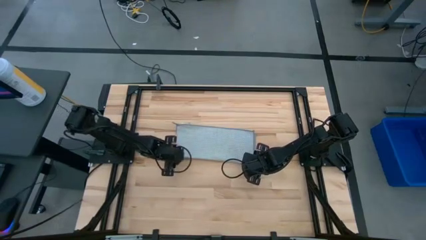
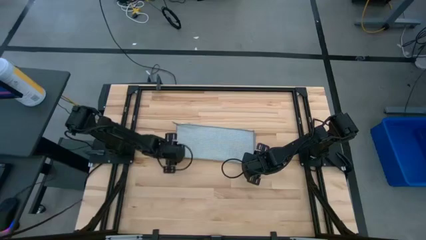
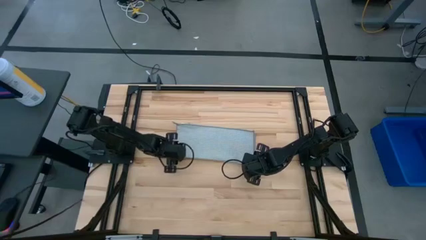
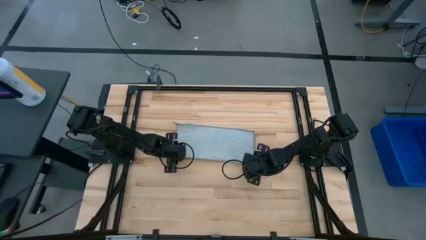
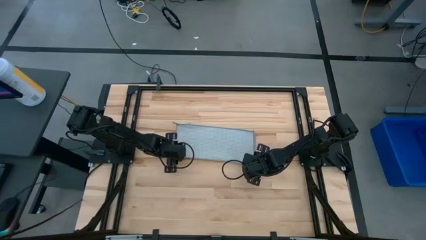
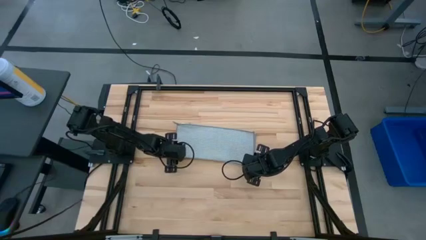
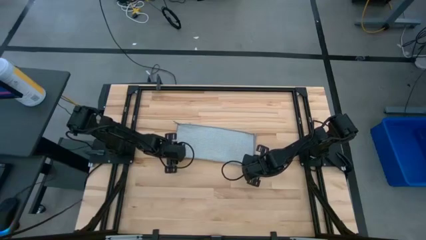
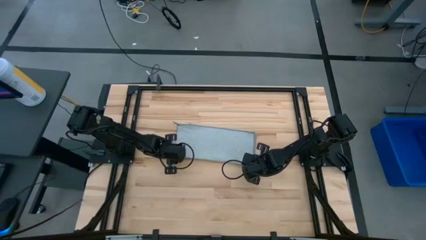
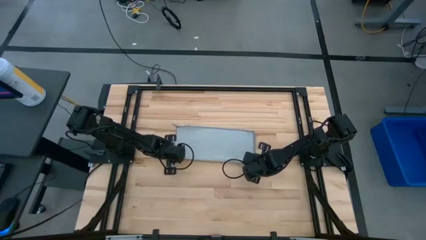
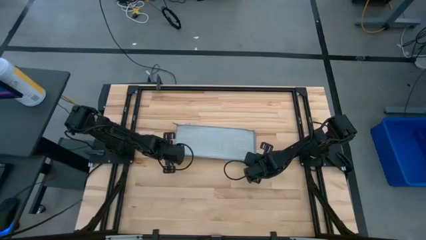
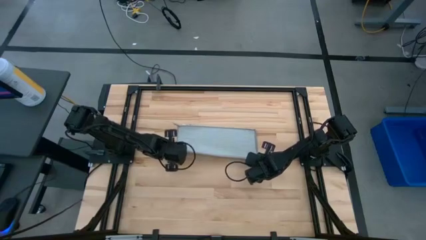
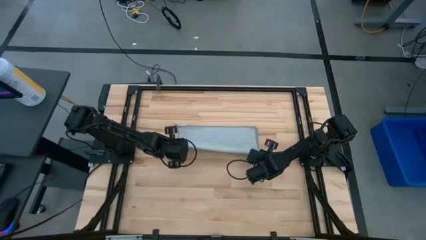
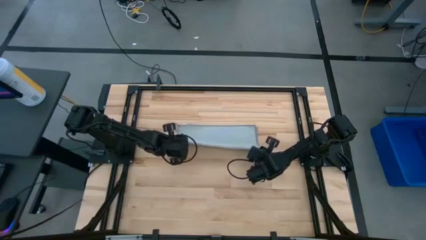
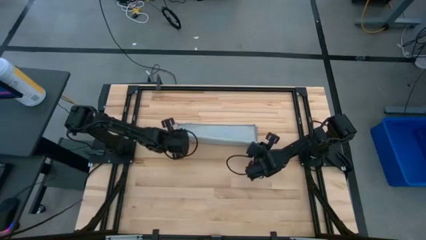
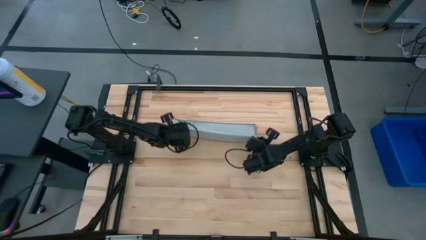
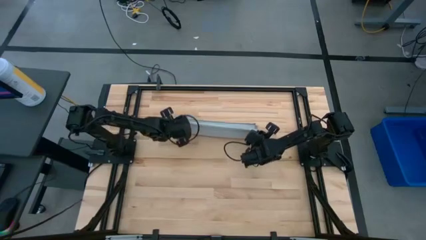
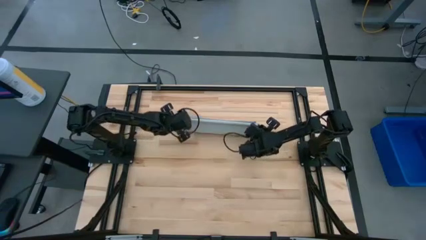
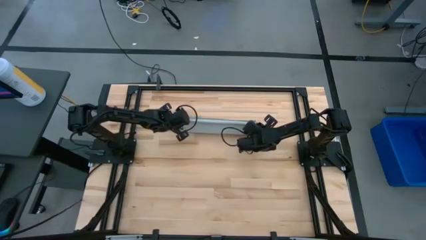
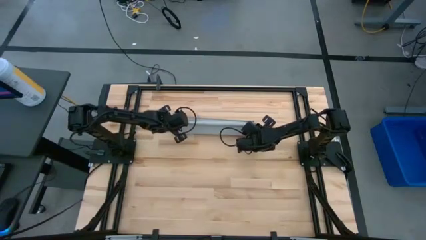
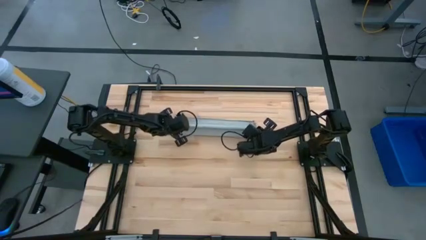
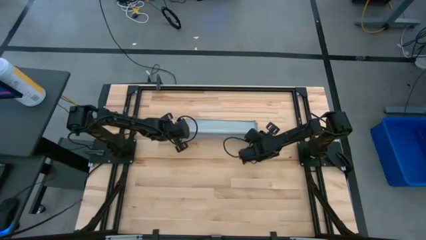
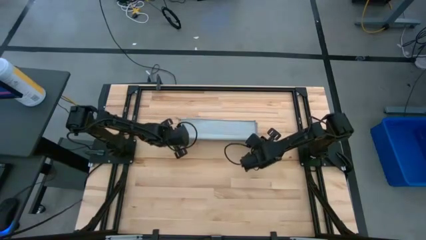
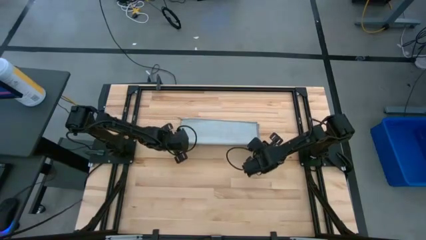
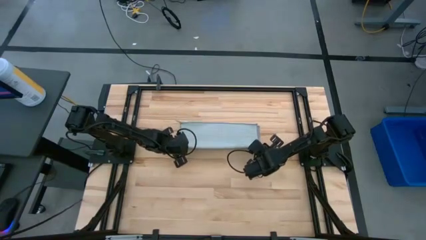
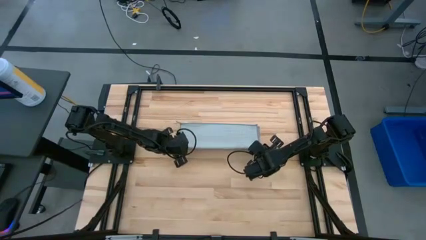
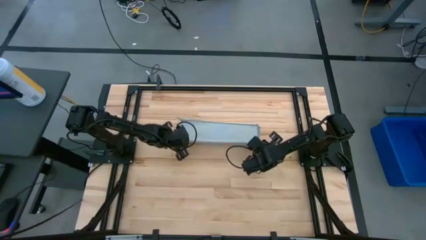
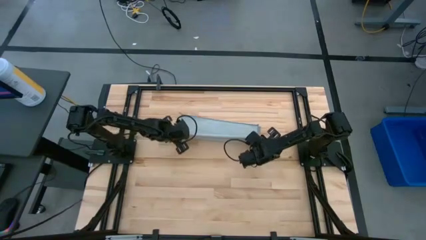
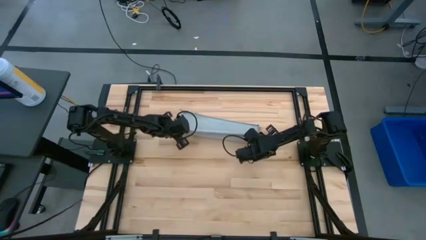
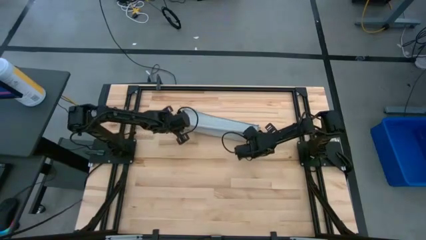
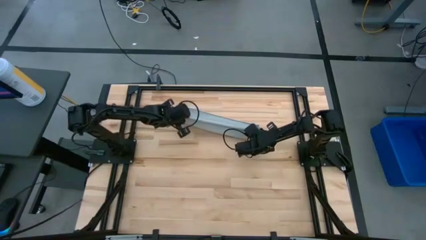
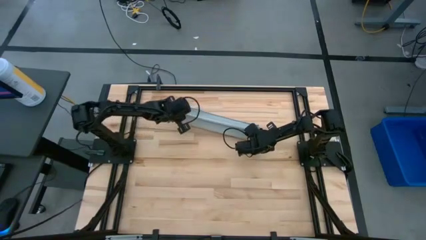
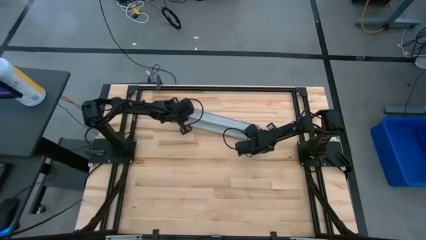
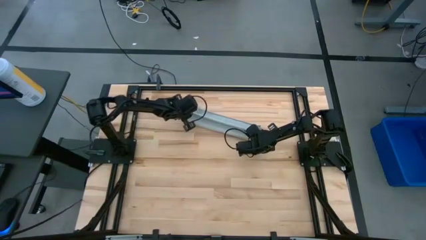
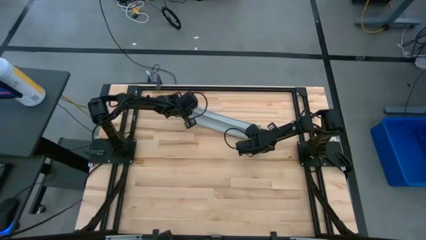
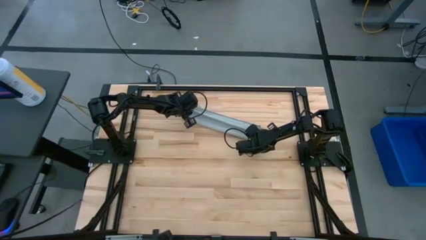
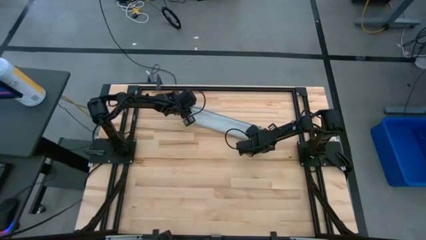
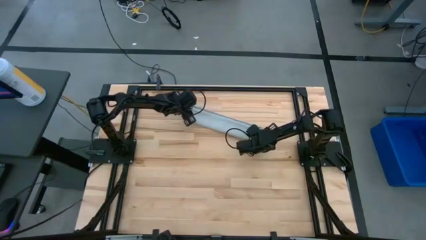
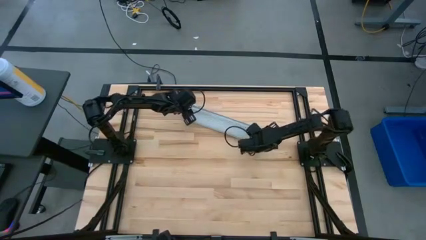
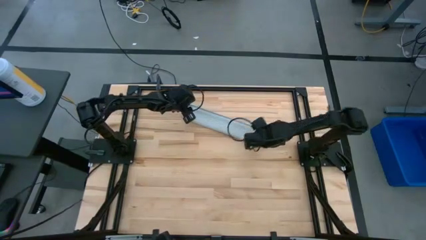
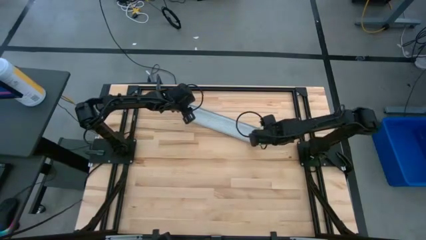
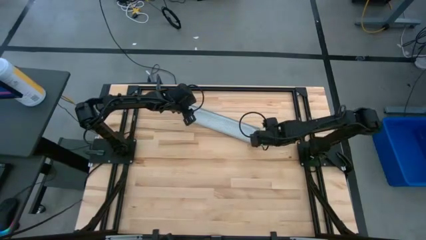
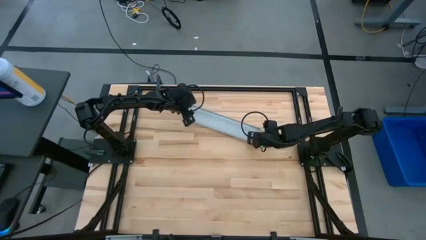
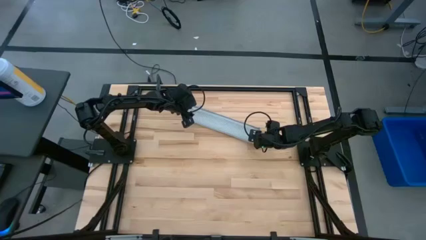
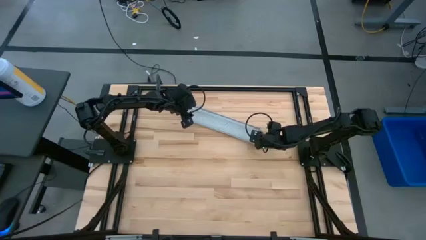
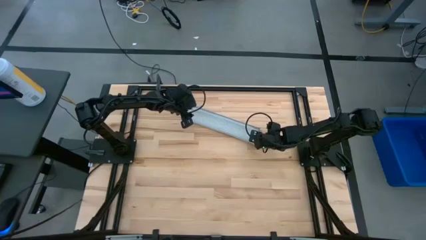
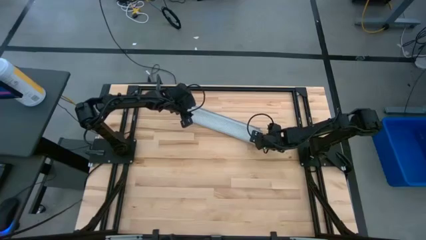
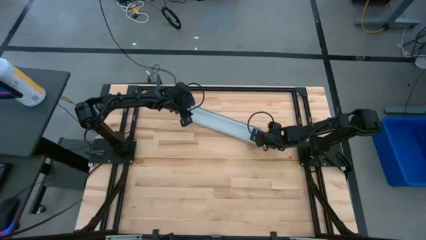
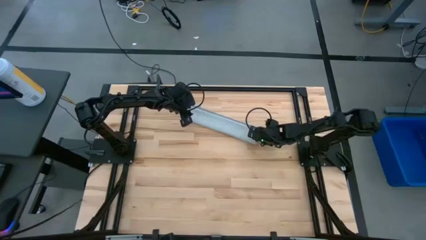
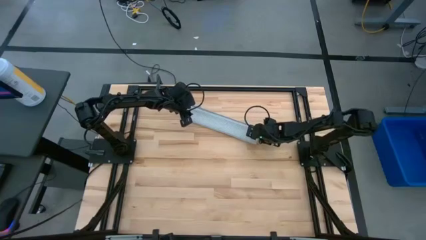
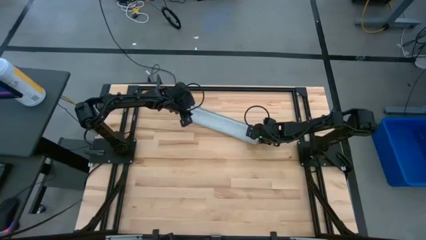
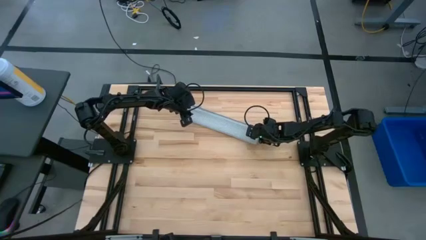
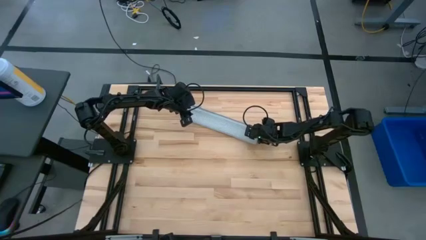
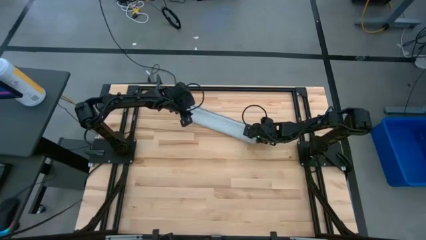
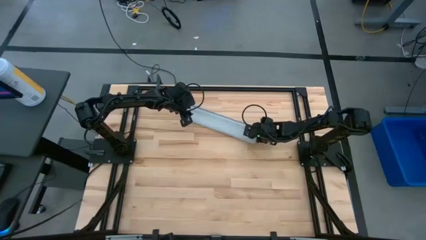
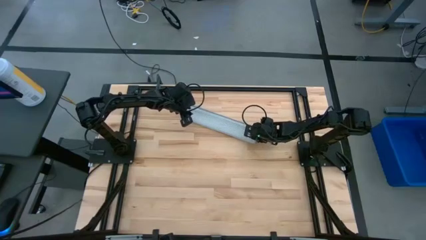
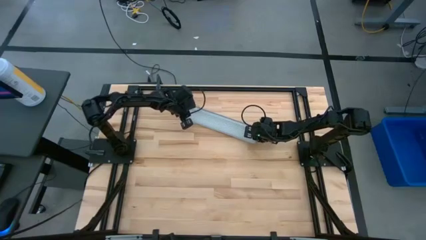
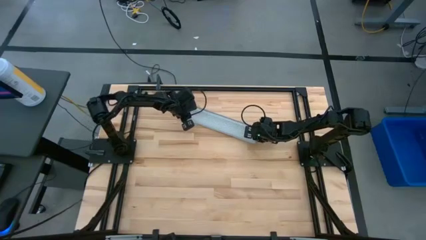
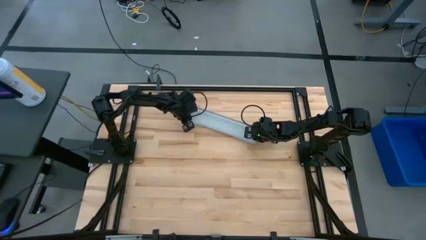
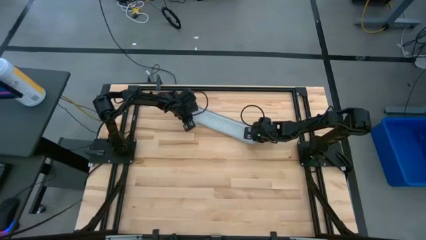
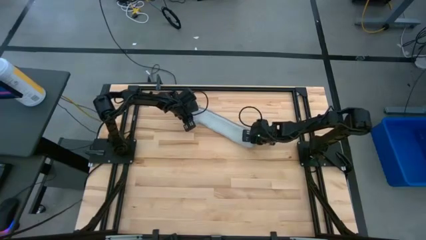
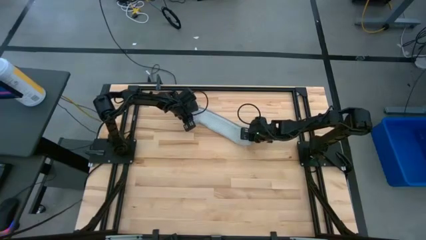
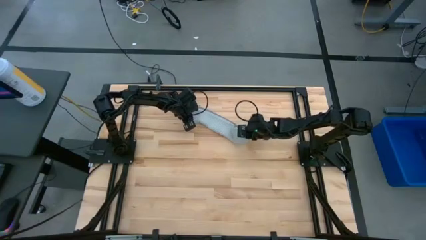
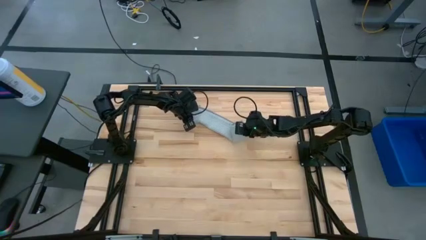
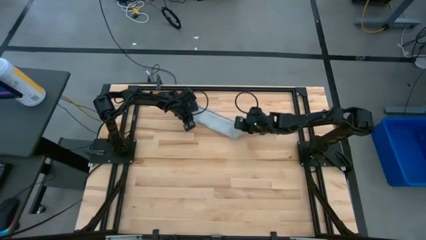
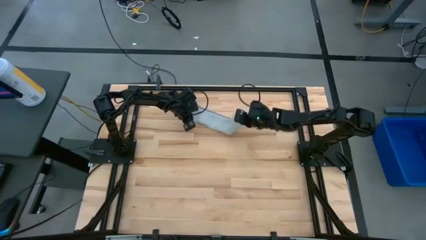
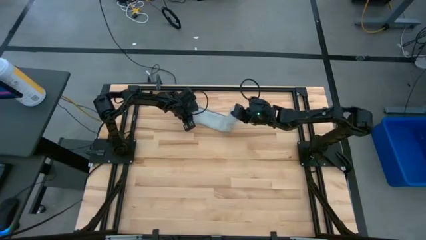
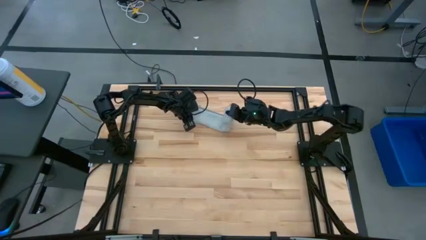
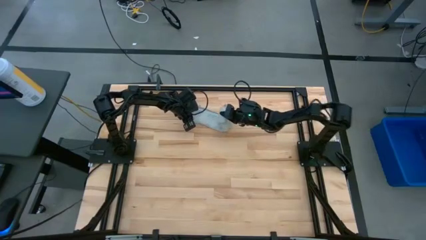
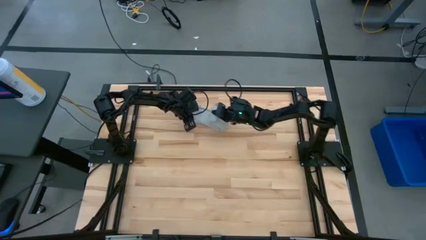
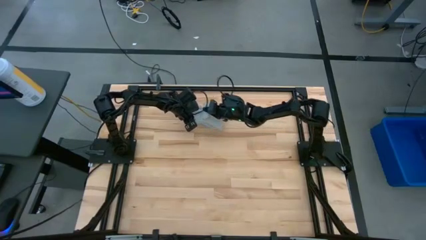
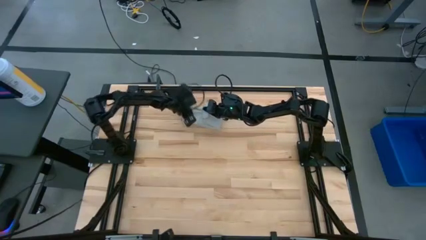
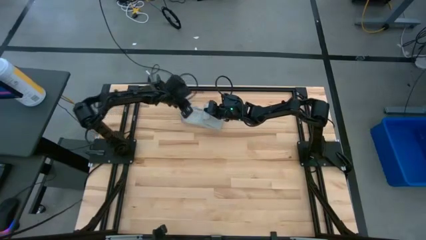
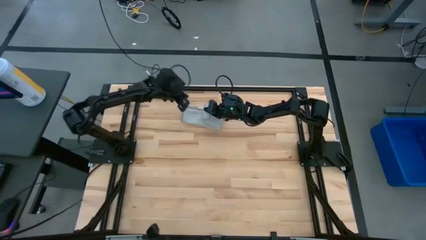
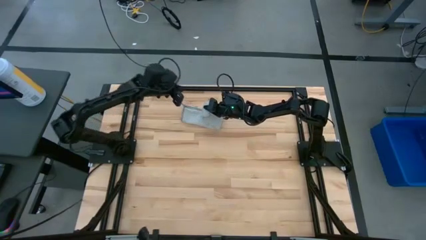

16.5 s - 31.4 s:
Task: Fold microfiber towels
Fold the gray microfiber cloth
